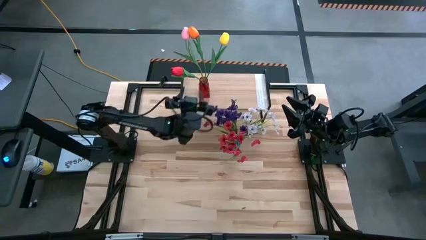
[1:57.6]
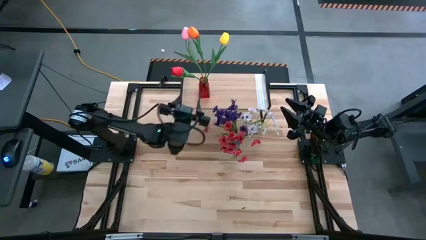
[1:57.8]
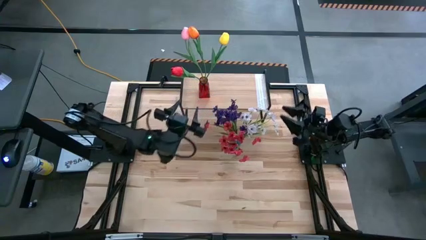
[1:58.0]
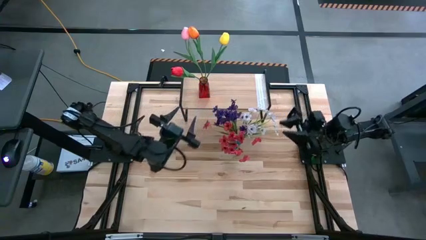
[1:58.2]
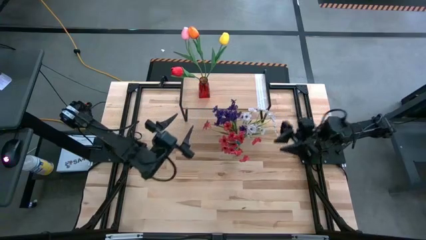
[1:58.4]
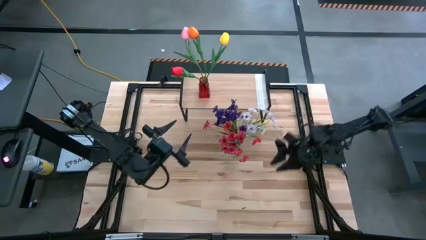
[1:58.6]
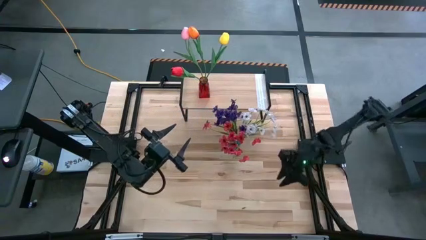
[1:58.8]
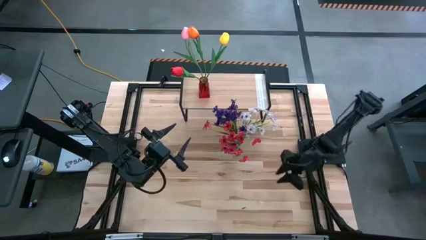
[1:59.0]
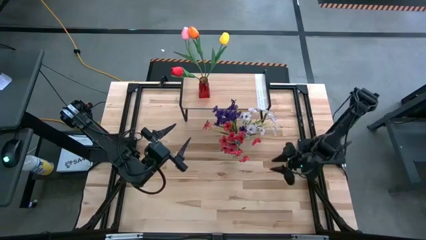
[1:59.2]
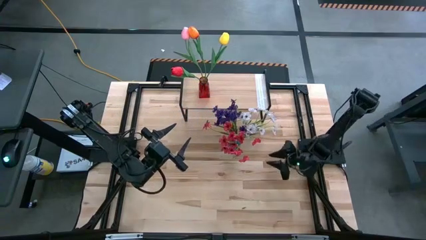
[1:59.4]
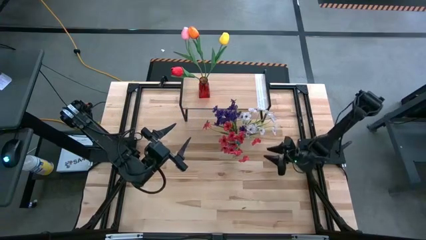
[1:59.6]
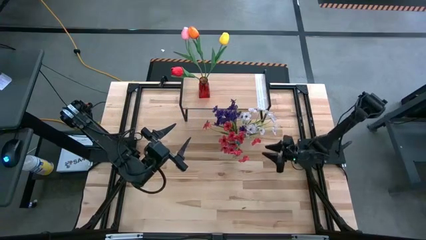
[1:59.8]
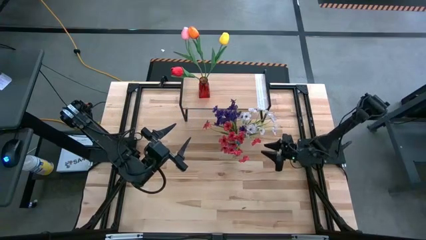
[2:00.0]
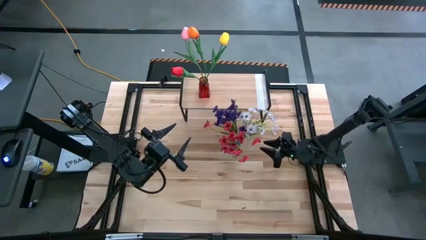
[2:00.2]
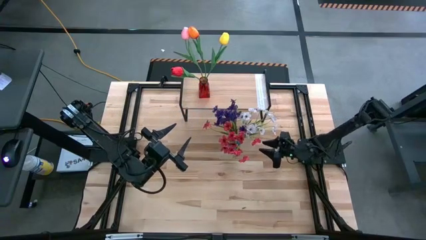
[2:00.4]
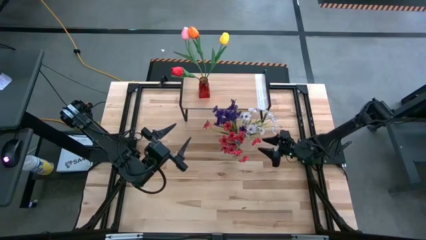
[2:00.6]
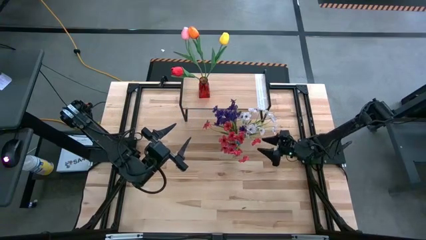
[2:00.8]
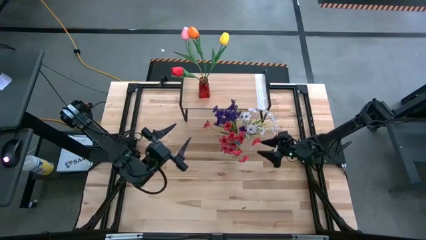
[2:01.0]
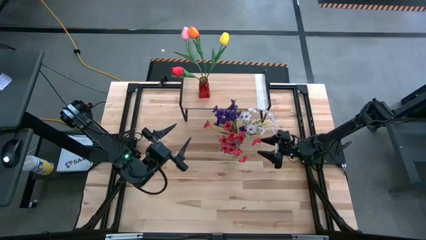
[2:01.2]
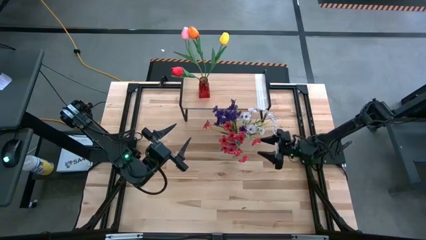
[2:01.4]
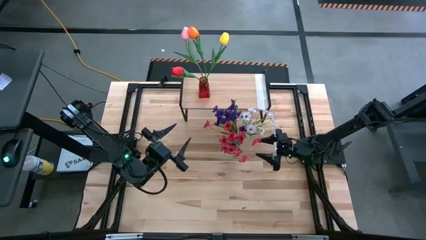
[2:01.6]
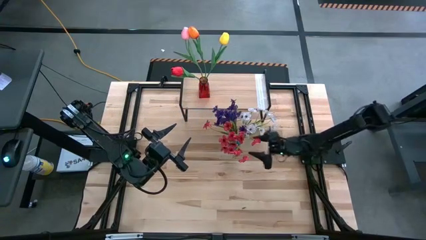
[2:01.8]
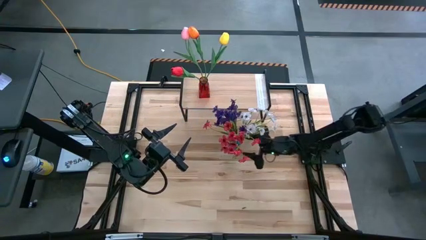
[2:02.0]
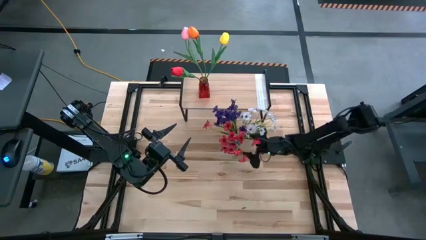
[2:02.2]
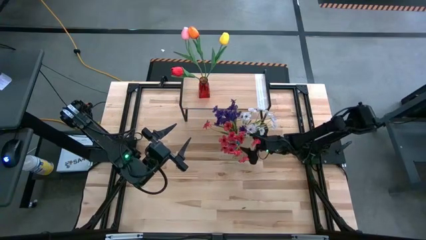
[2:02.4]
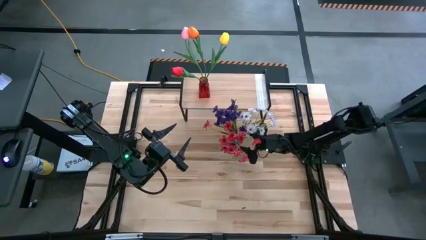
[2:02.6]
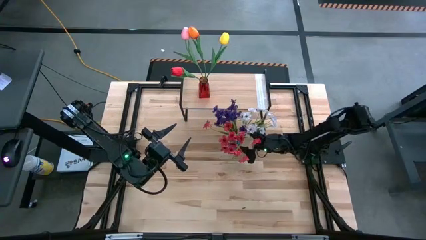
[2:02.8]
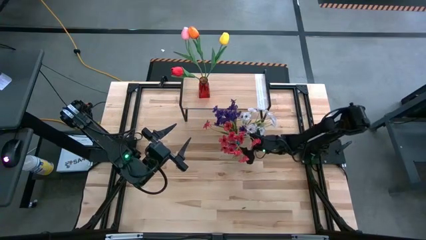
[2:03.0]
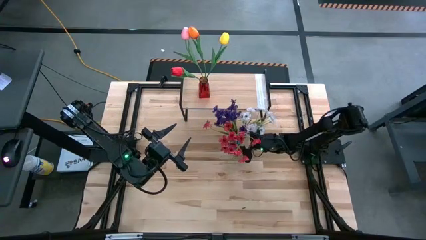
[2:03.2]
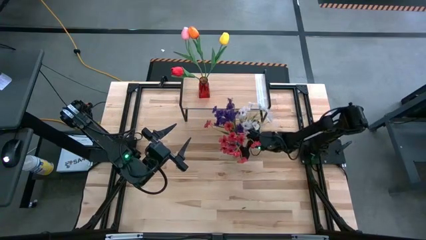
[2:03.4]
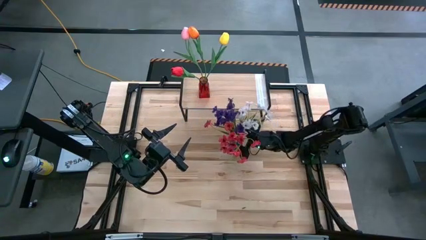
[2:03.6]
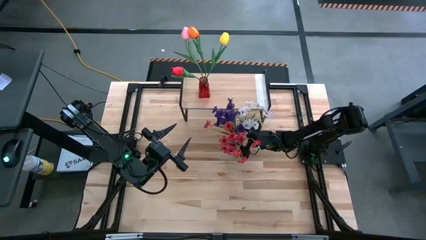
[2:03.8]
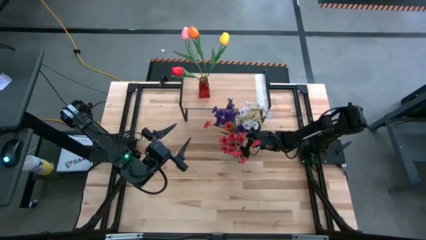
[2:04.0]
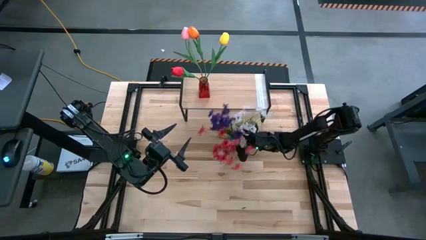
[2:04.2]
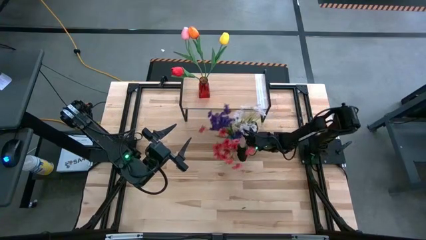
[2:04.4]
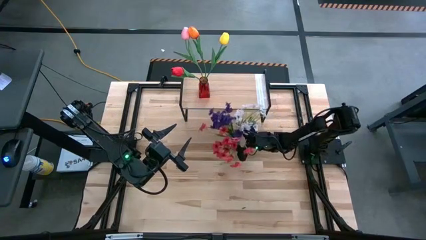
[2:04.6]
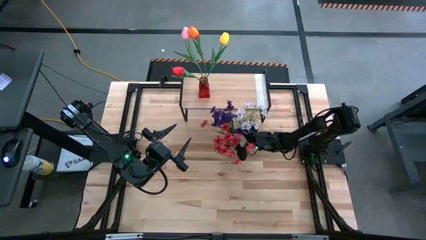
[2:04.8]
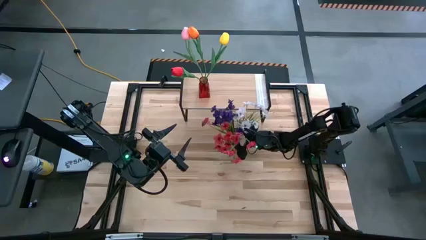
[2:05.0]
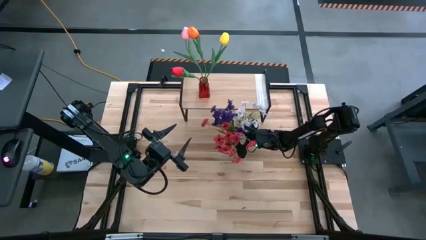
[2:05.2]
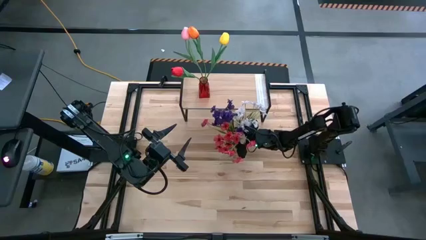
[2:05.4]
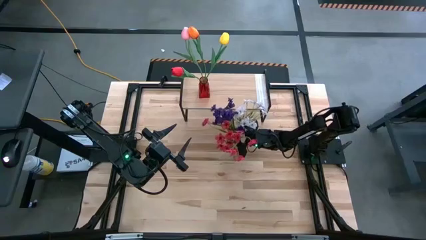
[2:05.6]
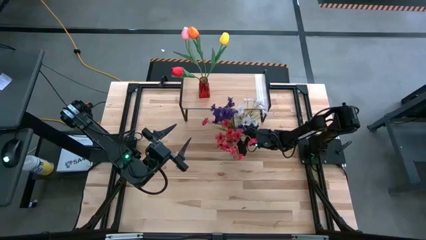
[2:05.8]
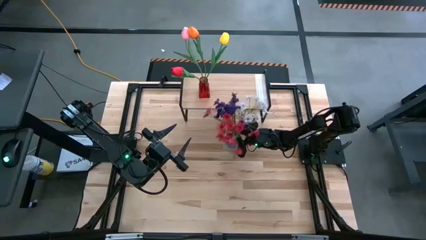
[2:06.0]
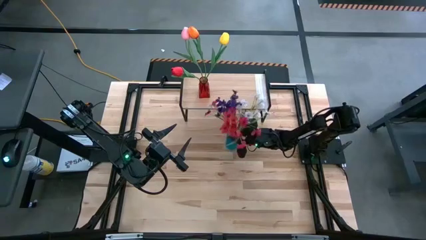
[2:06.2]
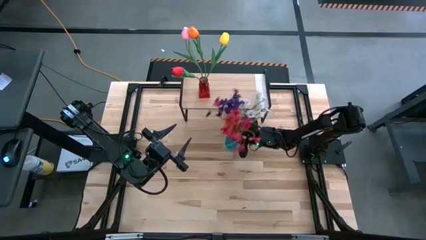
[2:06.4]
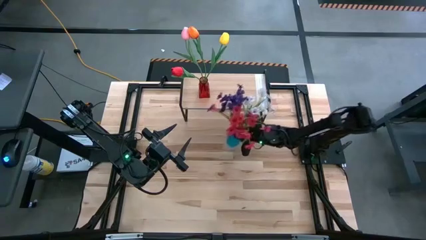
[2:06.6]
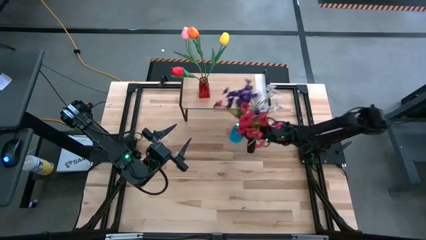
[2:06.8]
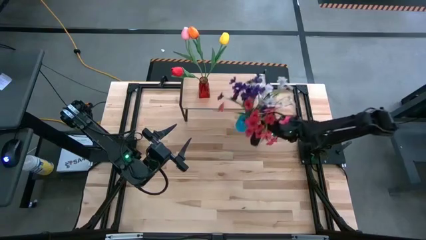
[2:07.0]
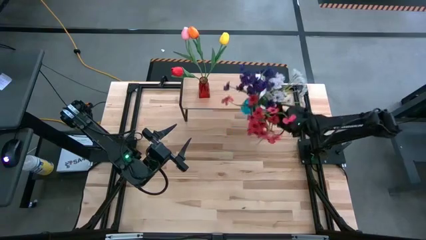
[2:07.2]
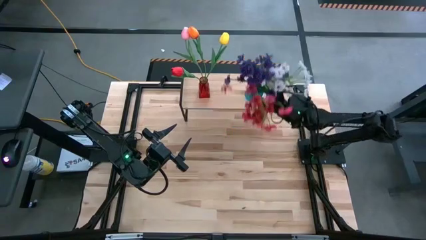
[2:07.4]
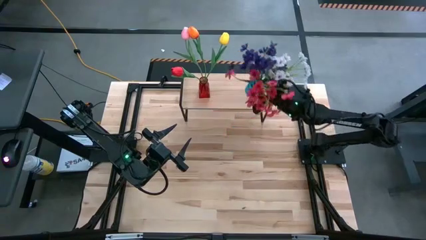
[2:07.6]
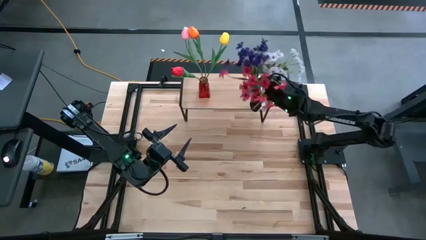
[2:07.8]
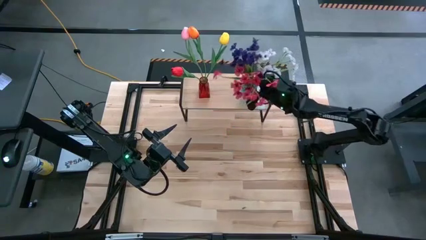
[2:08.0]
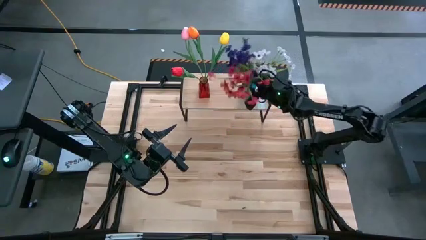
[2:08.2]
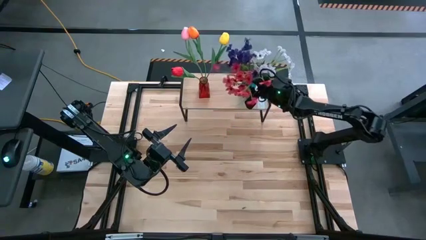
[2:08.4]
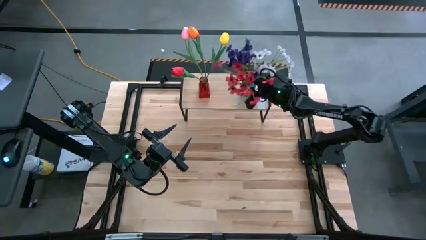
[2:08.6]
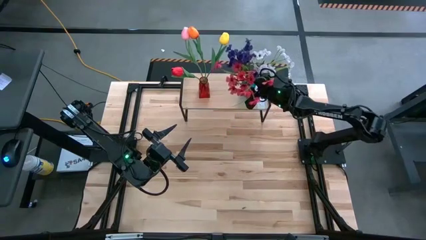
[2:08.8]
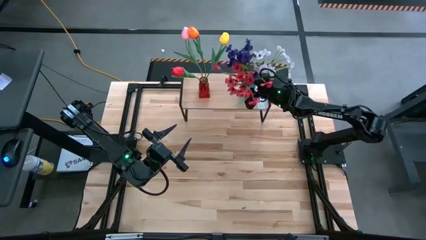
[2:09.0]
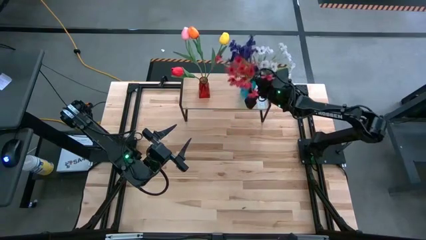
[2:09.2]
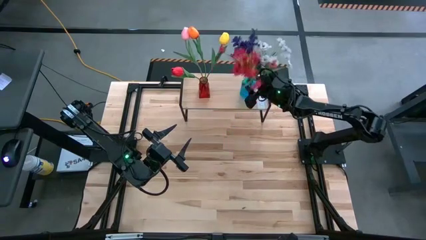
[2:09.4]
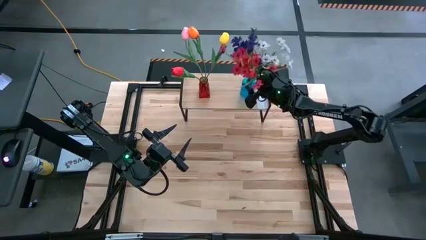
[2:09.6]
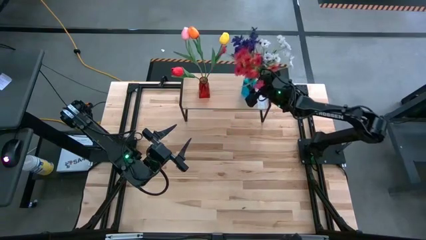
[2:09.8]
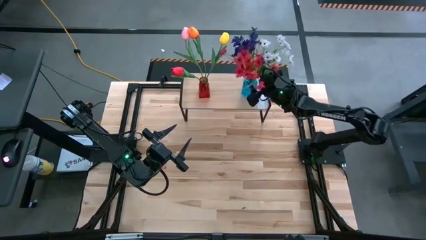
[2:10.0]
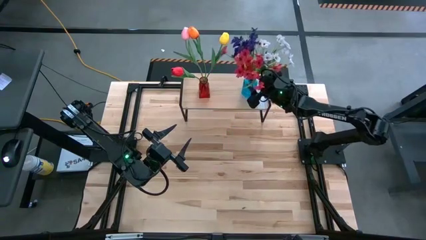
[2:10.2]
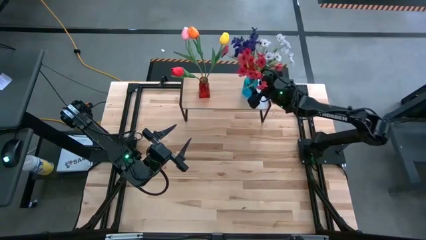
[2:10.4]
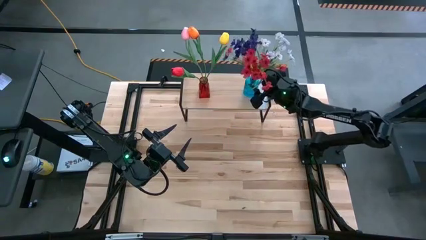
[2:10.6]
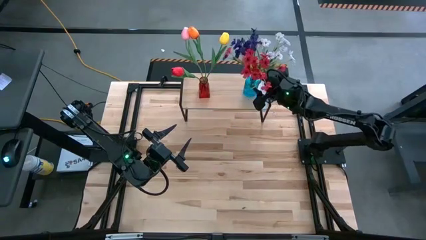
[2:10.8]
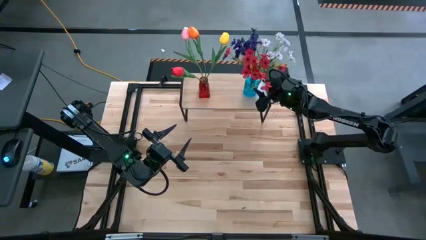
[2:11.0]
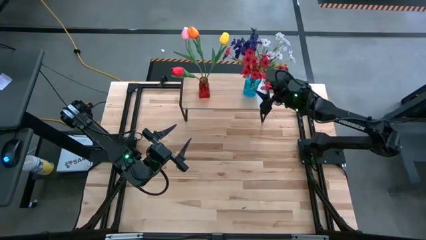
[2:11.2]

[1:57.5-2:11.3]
Task: Pick and place flowers into a vace then onto a shelf
Put the blue flower vase on the shelf
